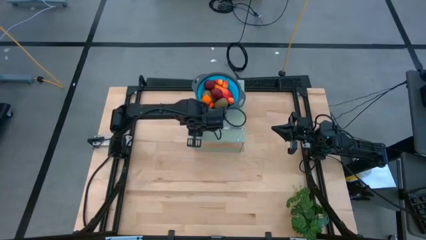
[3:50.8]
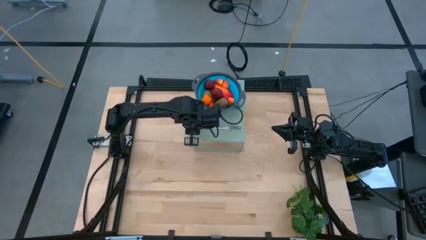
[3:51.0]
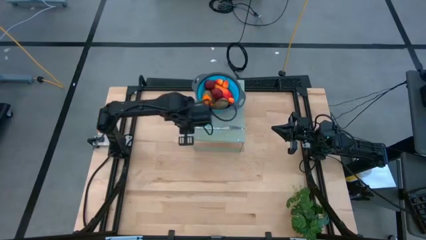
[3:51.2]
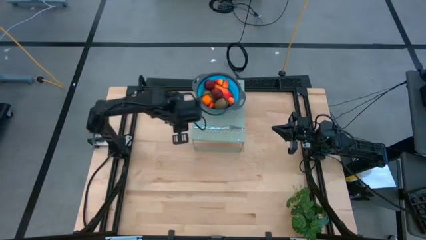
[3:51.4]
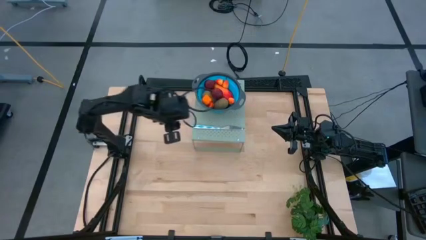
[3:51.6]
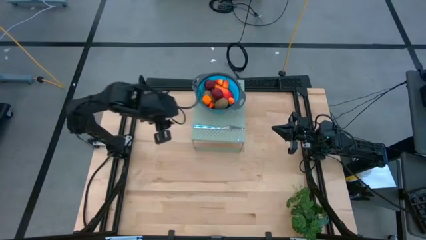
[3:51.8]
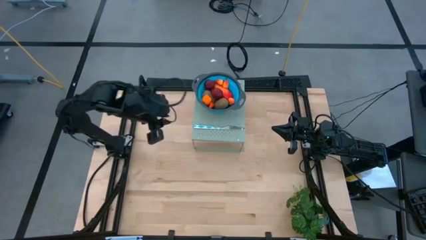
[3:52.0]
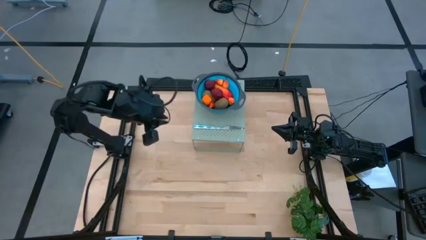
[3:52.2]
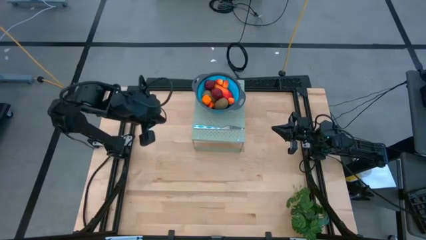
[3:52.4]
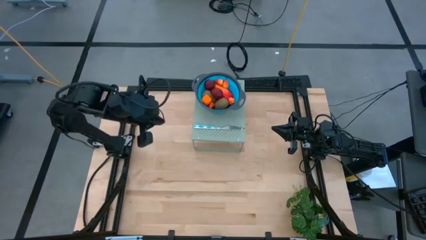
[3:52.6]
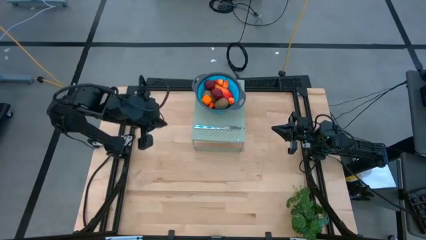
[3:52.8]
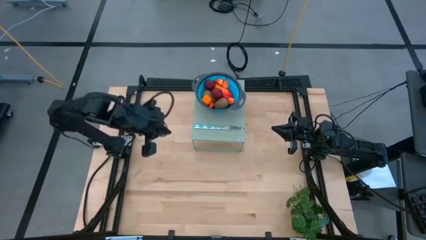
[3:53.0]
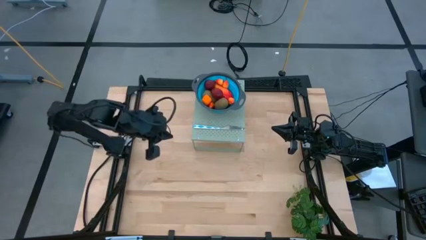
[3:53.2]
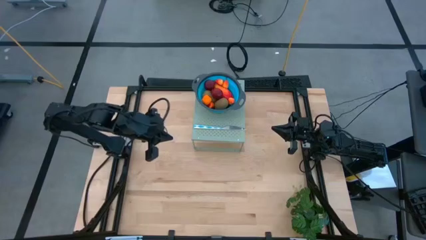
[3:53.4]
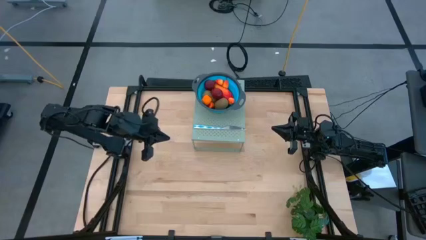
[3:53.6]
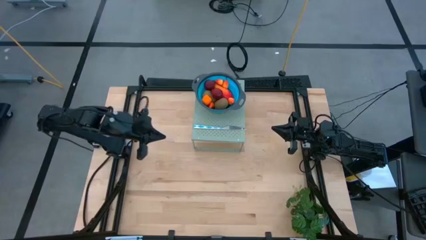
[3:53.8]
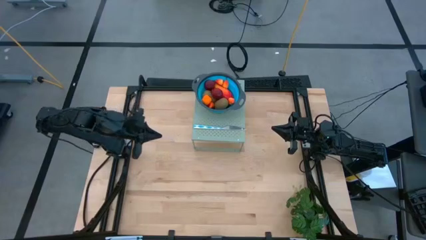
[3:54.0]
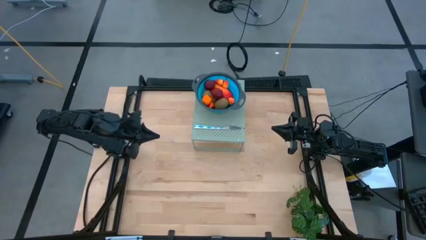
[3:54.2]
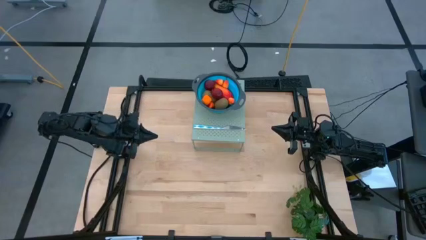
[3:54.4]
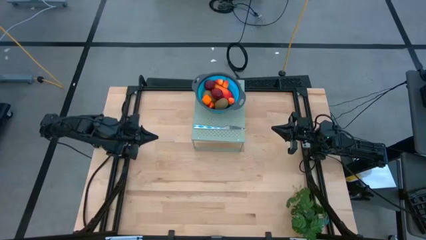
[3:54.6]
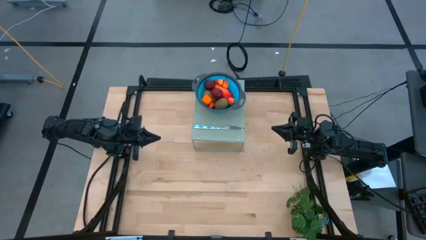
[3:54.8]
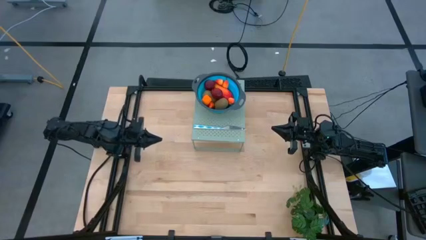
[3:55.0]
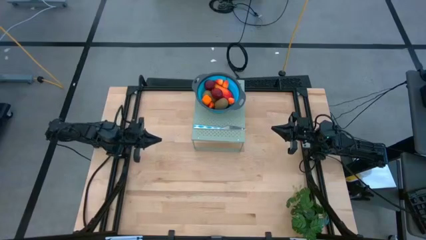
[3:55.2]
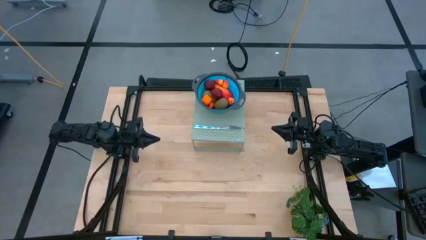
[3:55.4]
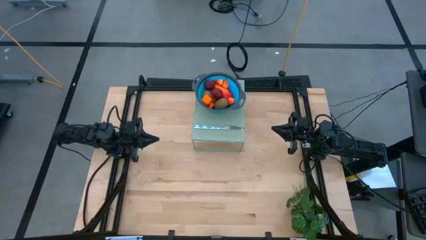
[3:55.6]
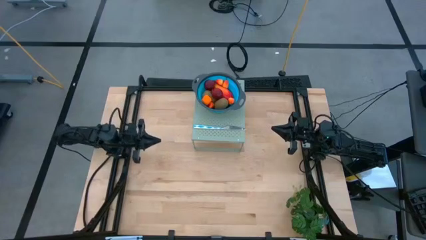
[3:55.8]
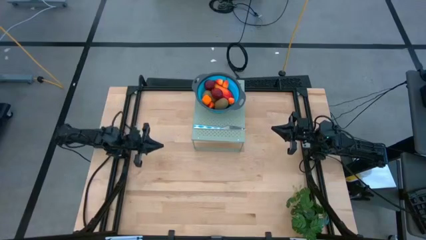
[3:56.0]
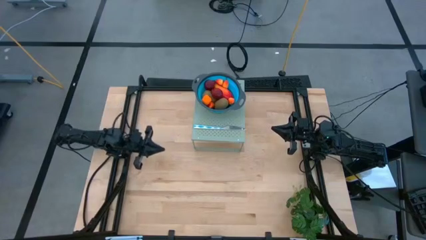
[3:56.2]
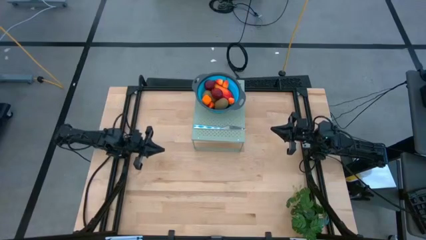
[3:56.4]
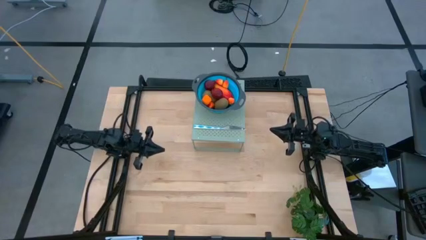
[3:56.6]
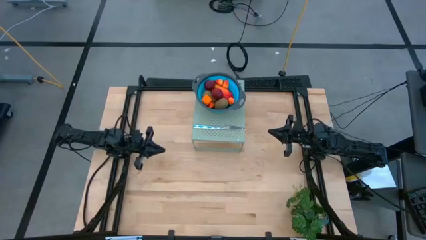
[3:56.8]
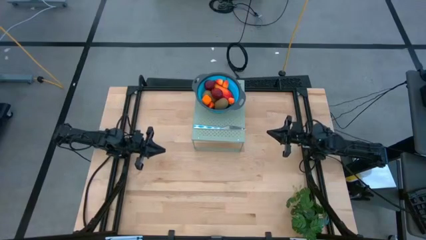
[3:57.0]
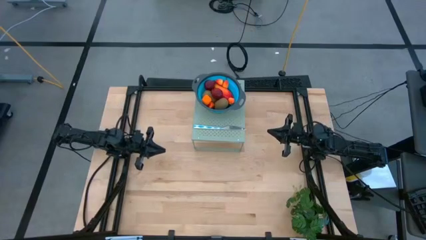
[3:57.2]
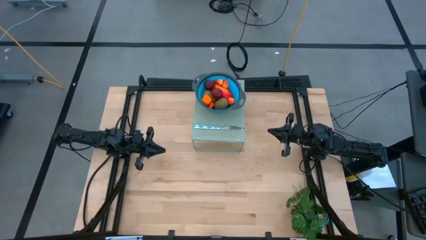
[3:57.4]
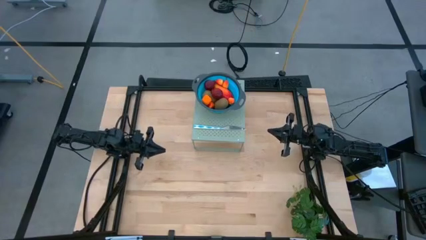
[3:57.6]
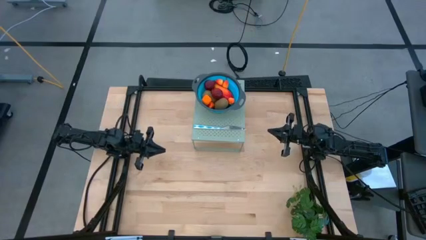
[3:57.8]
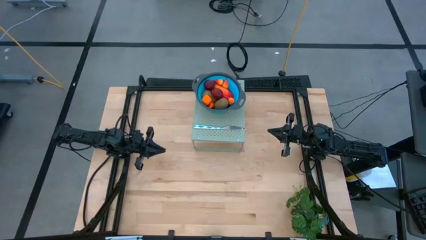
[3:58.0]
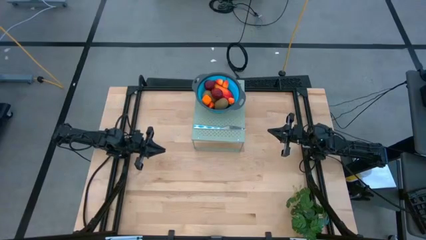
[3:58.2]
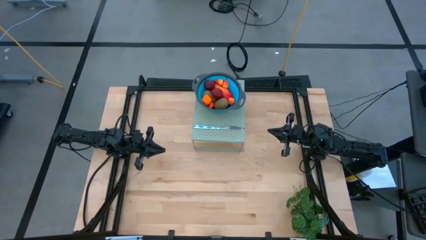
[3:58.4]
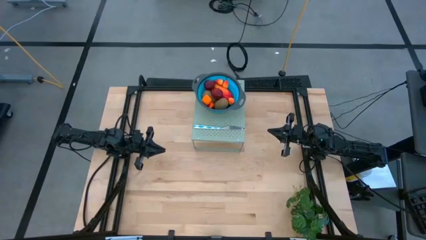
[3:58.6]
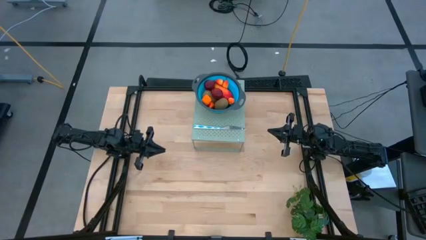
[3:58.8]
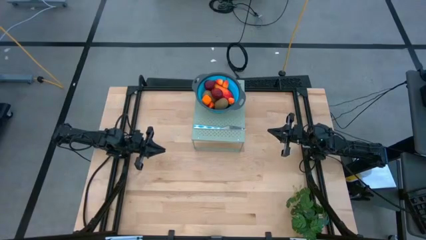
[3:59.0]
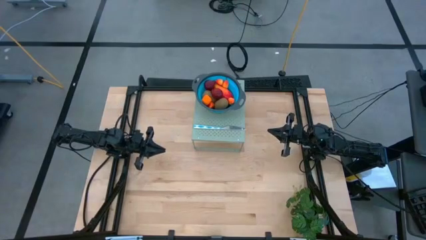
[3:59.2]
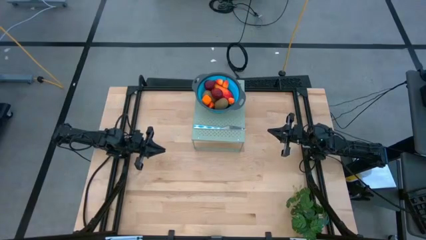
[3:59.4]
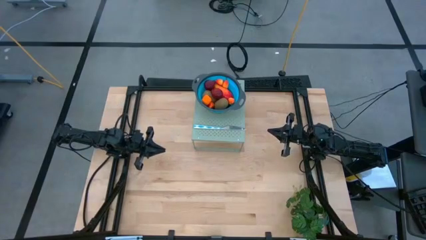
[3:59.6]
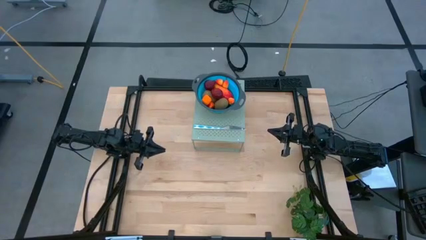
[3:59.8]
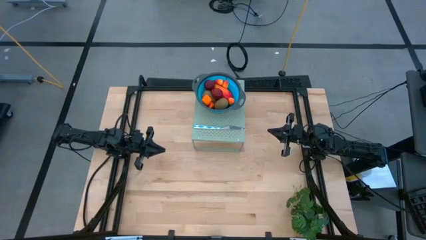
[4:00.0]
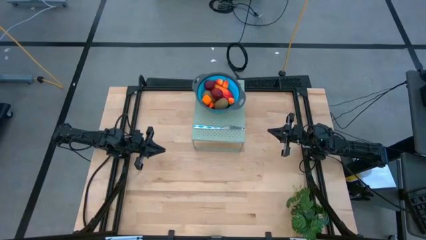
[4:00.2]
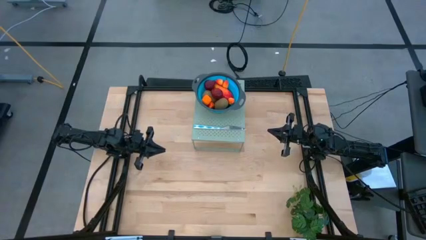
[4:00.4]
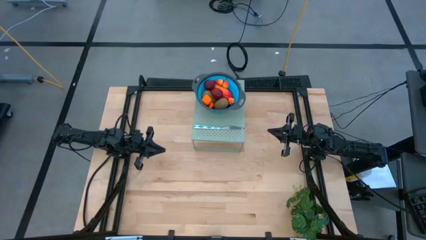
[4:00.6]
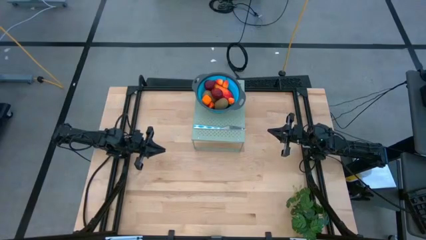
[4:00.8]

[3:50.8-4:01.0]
Task: Pick & Place Fruit
Return To Home Position

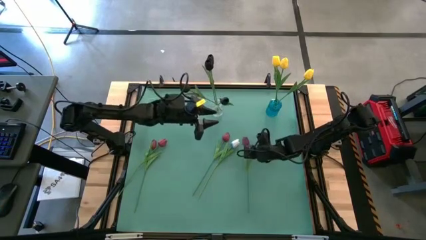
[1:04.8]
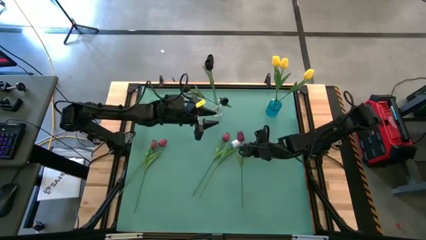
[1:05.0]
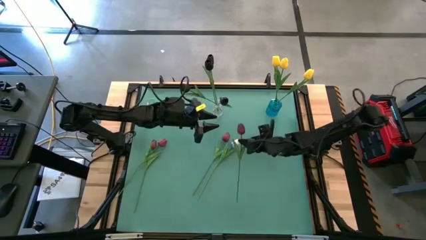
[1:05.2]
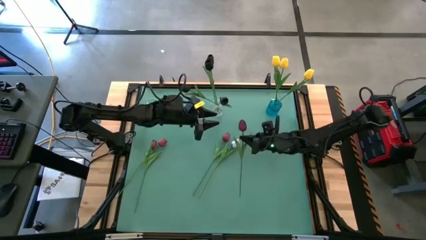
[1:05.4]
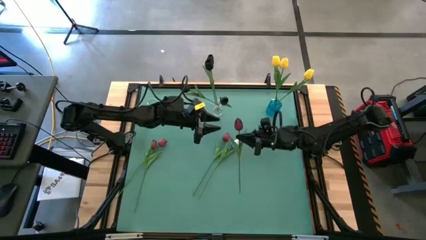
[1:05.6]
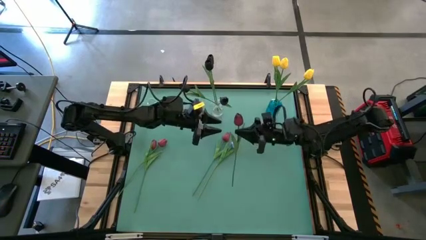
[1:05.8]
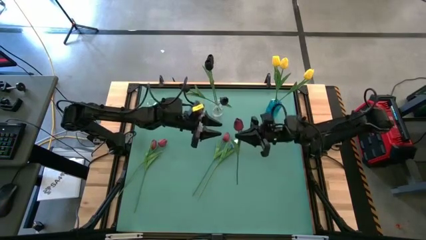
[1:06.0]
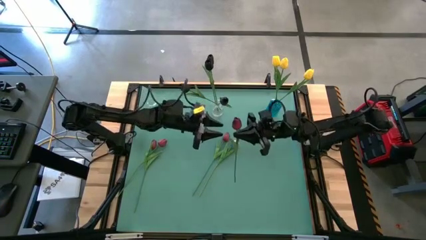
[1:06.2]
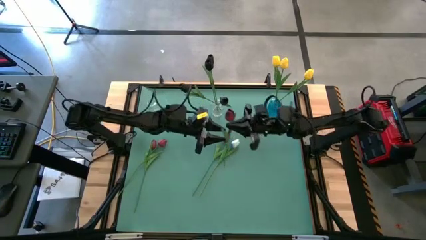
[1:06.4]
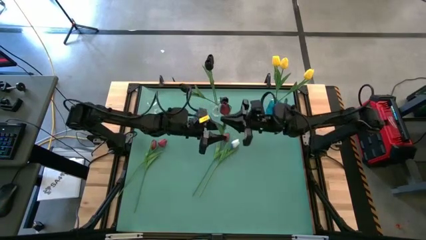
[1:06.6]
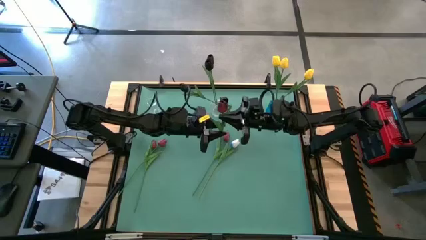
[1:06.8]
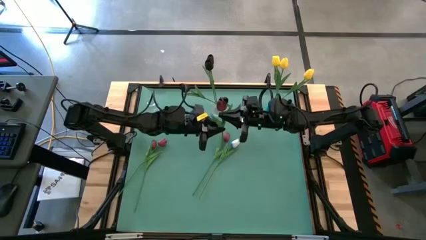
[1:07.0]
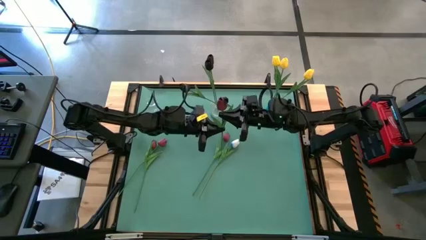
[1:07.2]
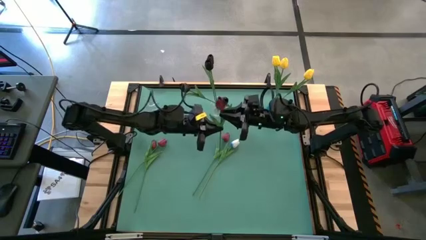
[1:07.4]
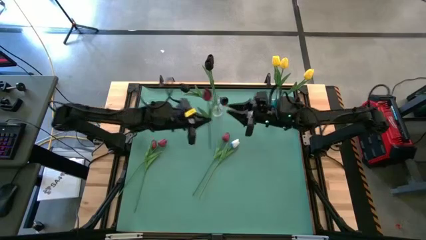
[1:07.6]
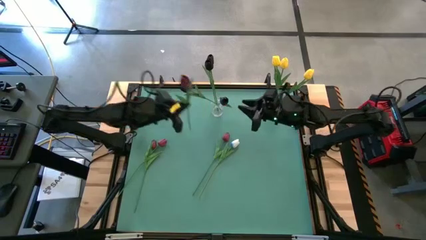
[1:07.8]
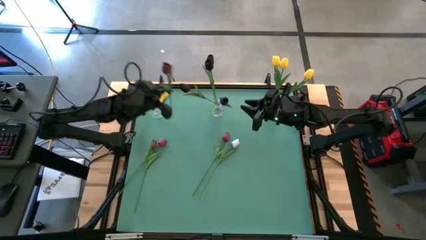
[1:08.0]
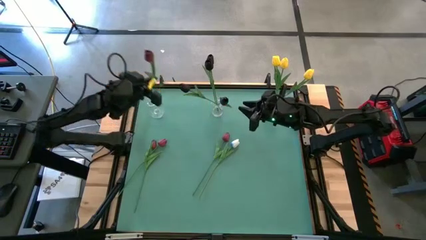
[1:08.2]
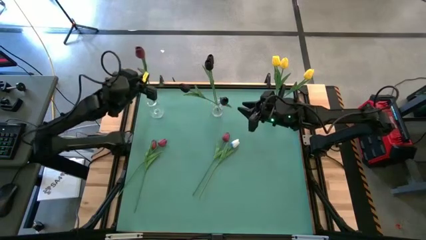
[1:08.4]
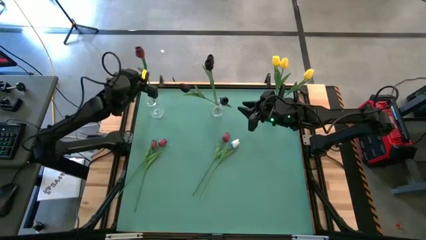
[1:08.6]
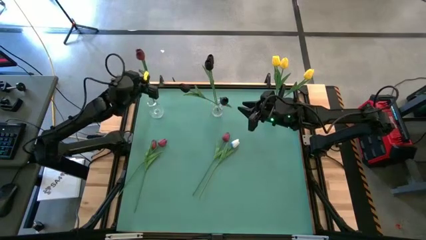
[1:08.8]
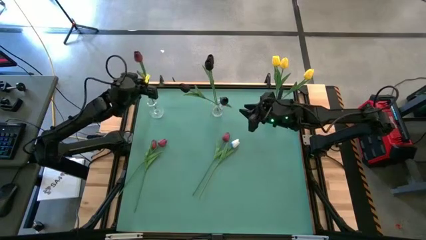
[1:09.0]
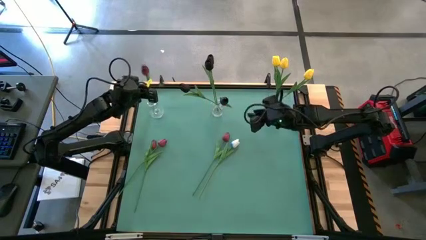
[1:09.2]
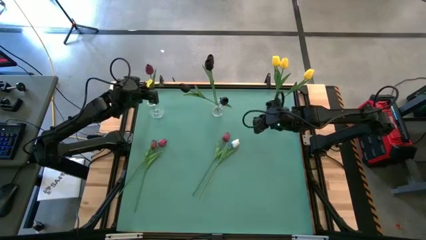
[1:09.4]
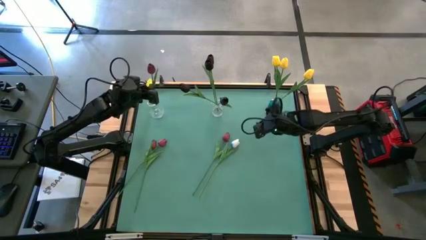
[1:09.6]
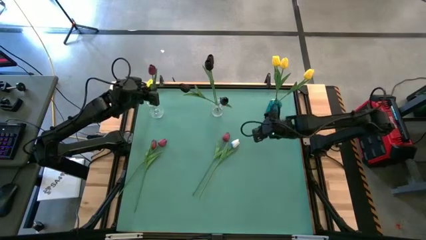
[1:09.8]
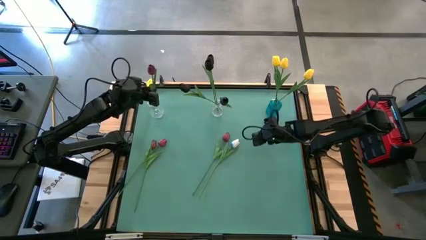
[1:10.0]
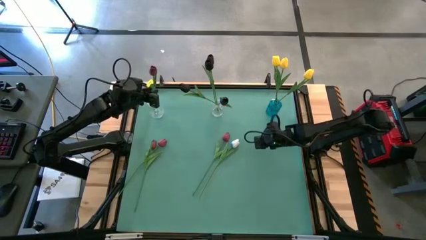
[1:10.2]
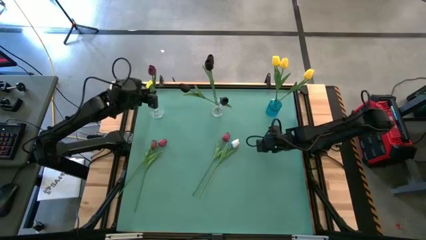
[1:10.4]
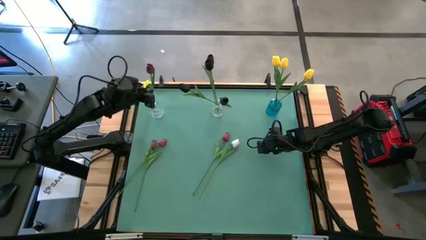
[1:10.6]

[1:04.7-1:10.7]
Task: Sort flowers into vase by color
Put the red tulip into the left transparent vase

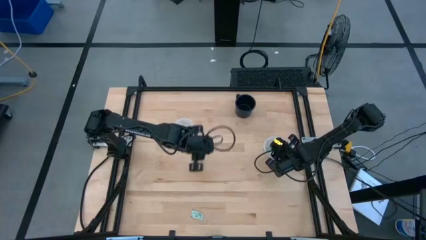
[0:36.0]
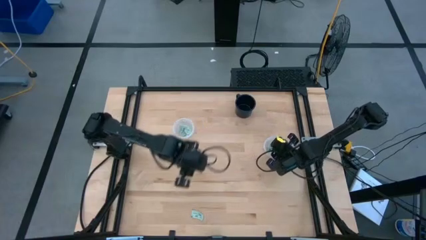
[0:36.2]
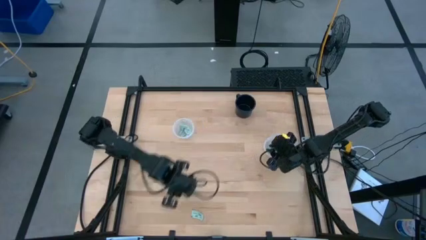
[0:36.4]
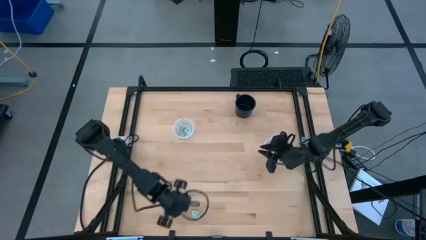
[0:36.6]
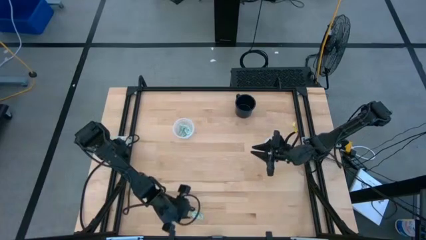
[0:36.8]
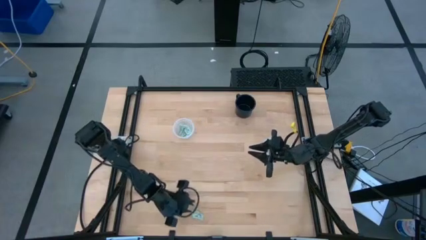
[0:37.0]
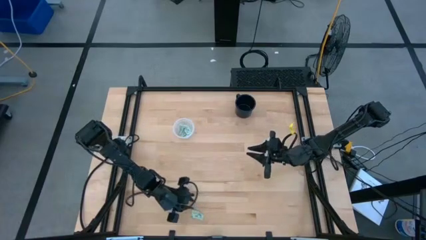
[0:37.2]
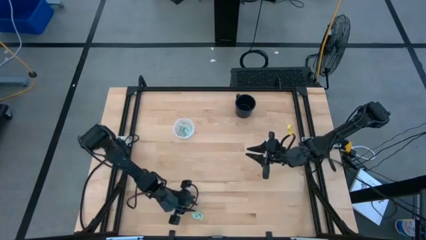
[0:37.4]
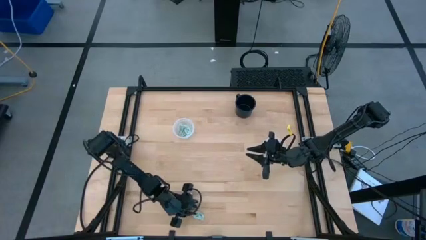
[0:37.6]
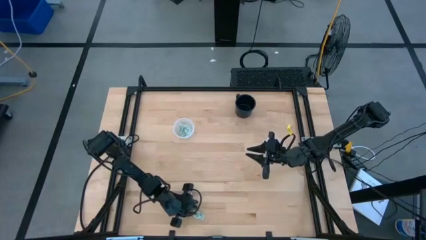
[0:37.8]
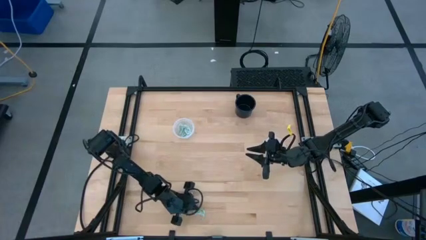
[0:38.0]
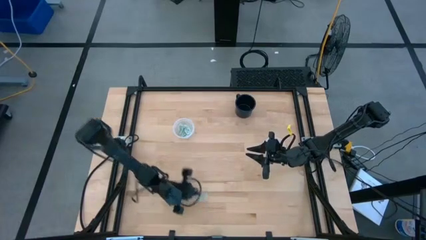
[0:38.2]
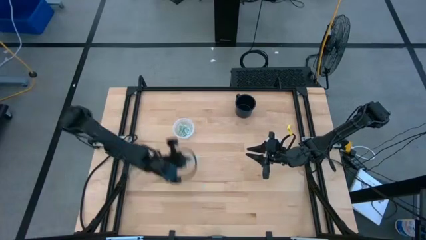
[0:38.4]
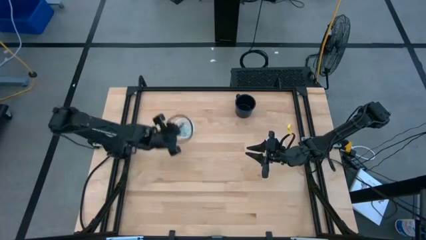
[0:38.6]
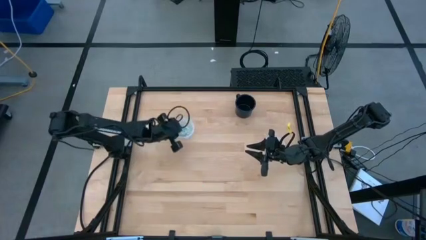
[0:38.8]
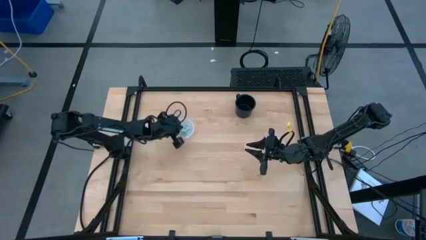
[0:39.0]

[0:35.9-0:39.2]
Task: Pick and place items into bin
Put the white stevia packet into the left transparent bin
